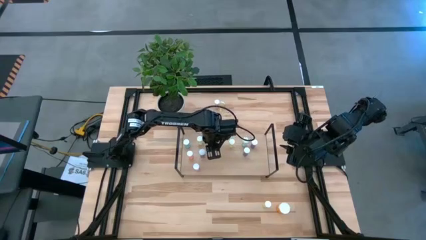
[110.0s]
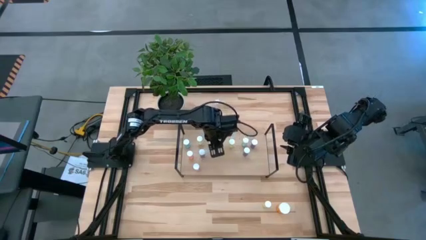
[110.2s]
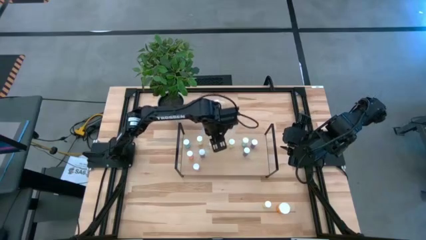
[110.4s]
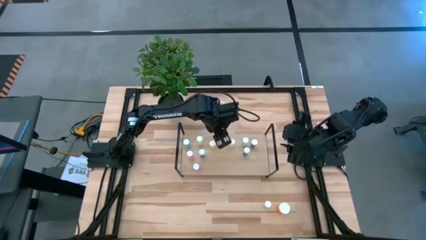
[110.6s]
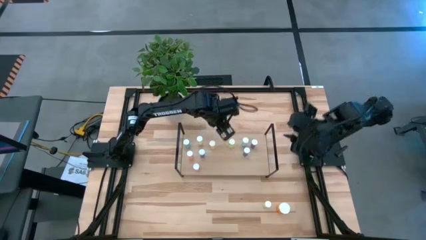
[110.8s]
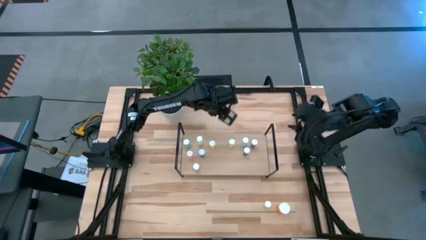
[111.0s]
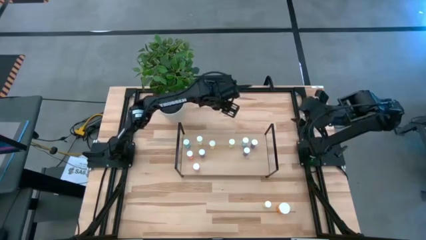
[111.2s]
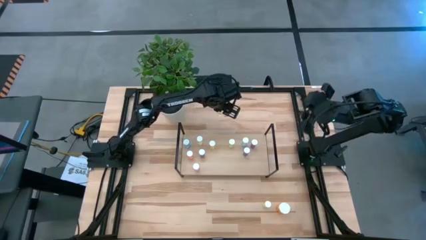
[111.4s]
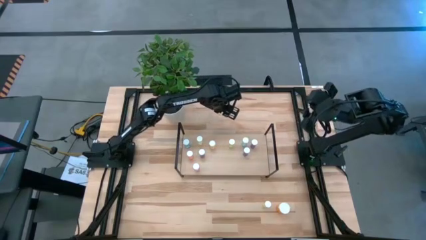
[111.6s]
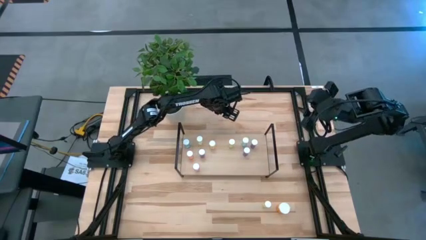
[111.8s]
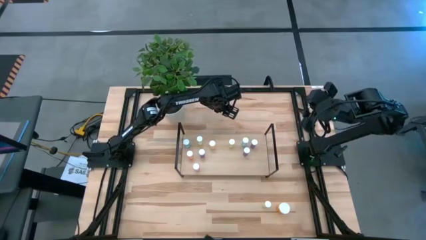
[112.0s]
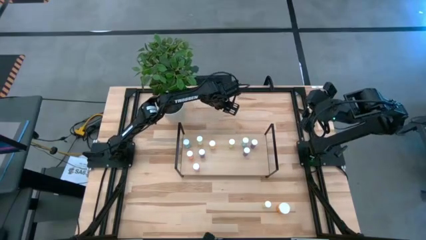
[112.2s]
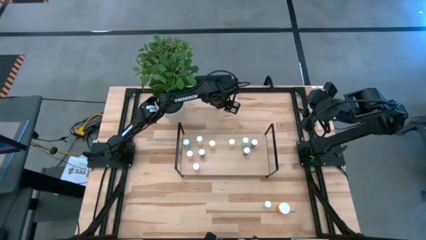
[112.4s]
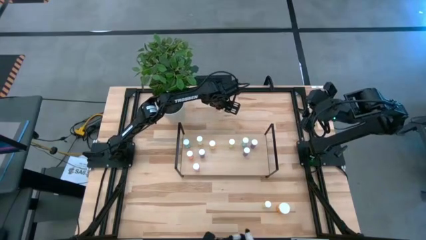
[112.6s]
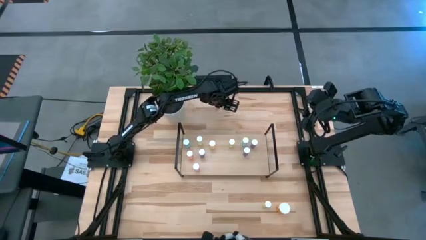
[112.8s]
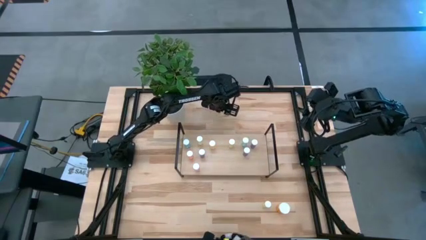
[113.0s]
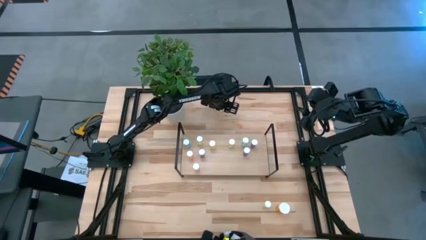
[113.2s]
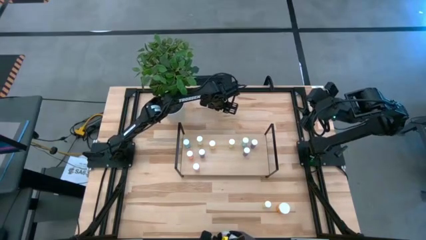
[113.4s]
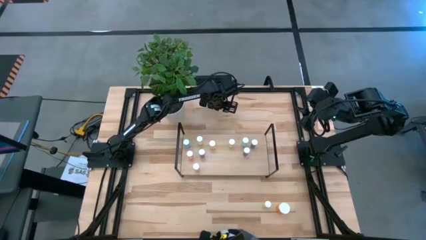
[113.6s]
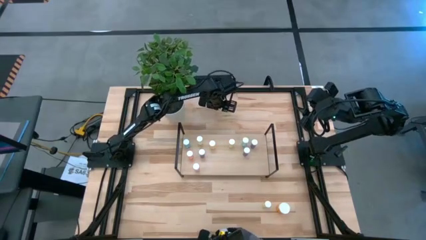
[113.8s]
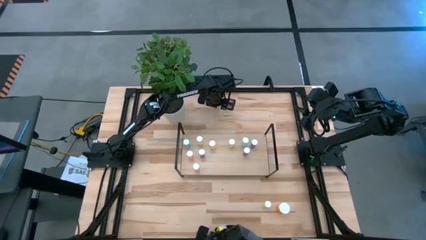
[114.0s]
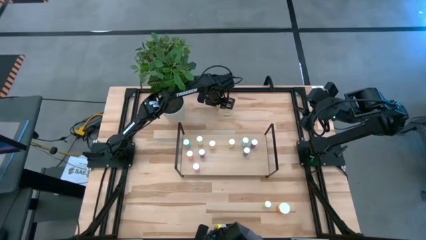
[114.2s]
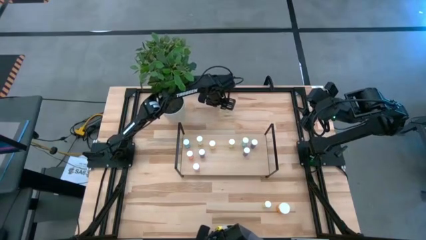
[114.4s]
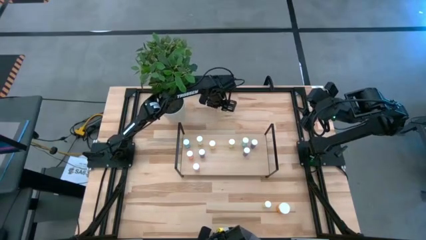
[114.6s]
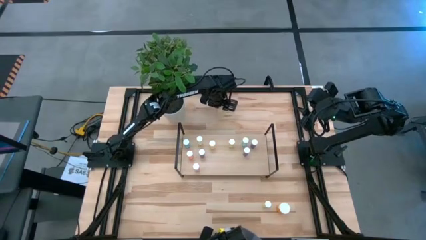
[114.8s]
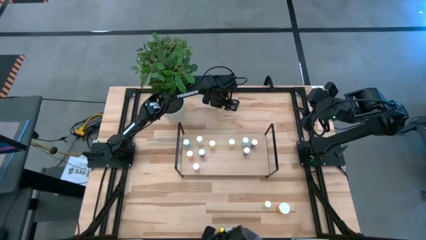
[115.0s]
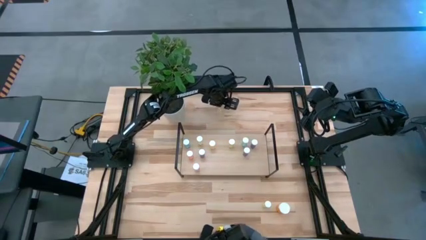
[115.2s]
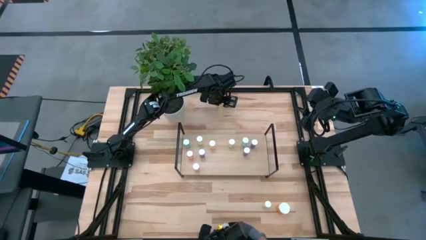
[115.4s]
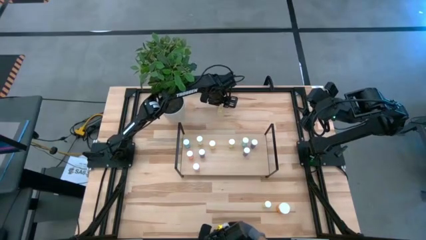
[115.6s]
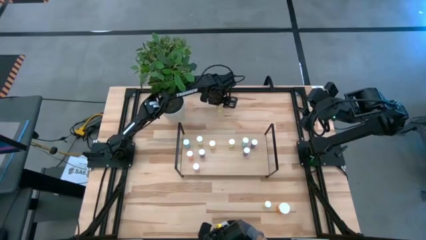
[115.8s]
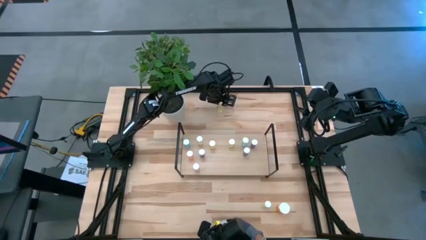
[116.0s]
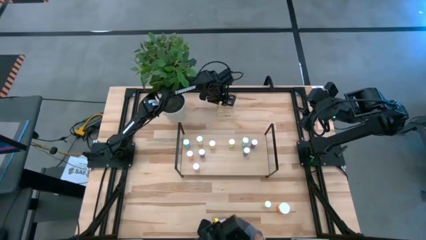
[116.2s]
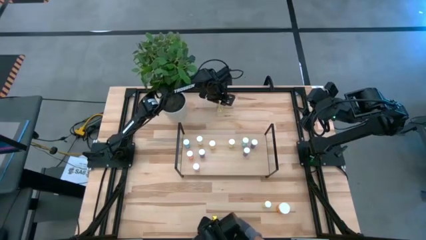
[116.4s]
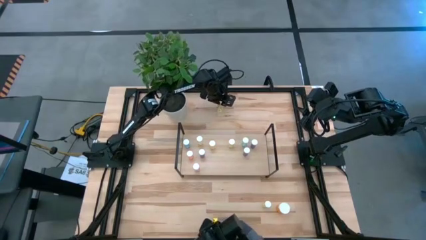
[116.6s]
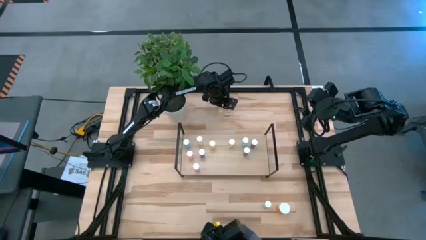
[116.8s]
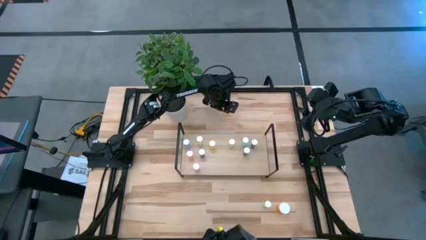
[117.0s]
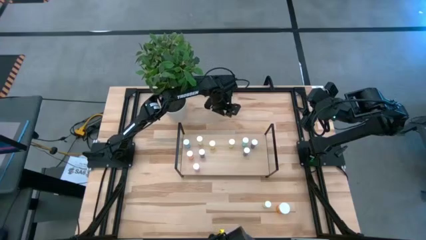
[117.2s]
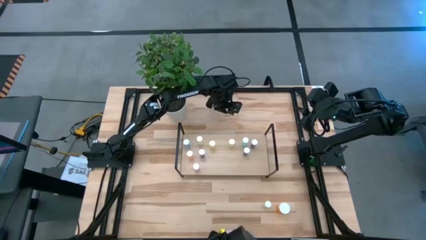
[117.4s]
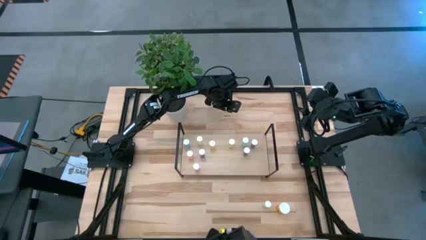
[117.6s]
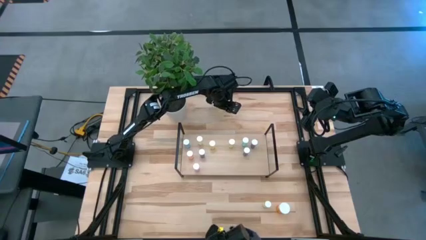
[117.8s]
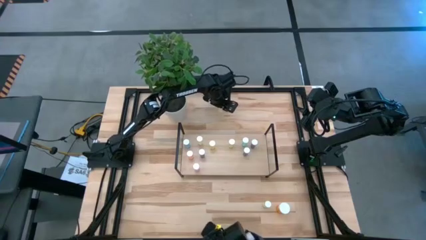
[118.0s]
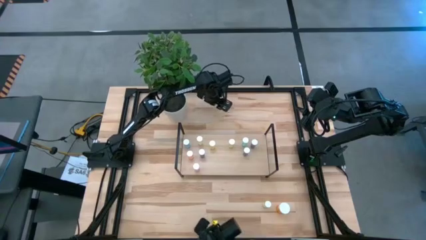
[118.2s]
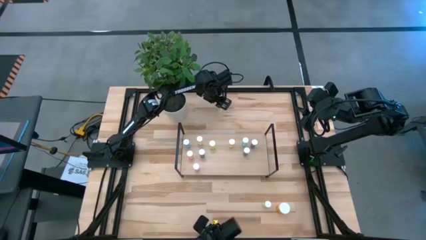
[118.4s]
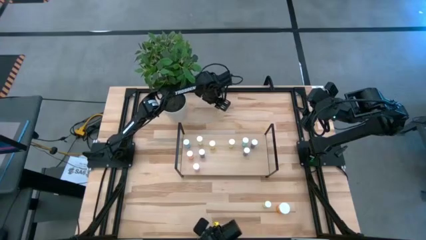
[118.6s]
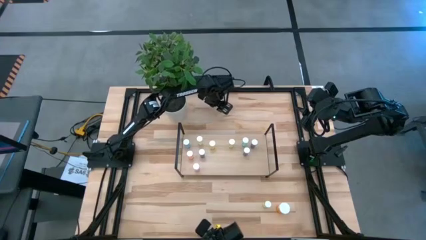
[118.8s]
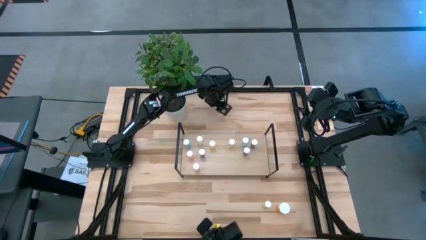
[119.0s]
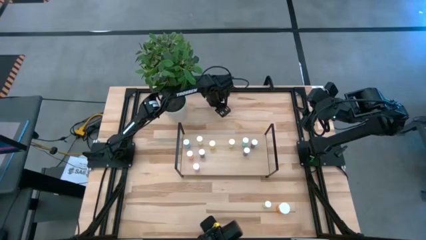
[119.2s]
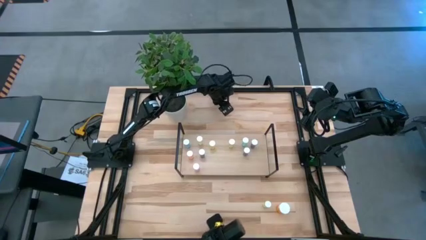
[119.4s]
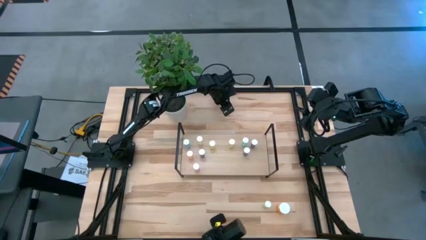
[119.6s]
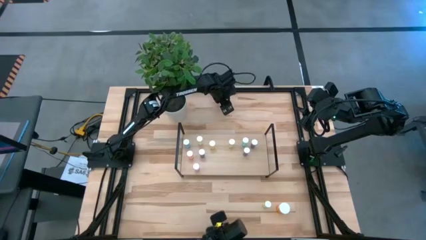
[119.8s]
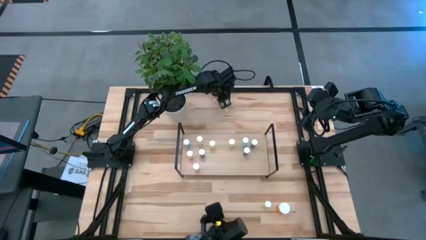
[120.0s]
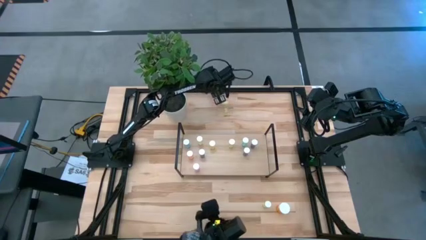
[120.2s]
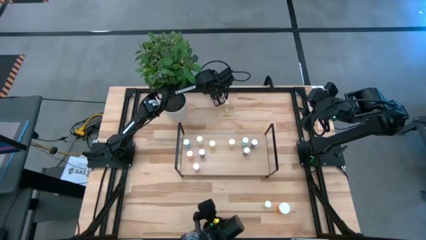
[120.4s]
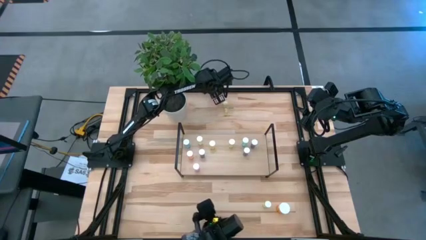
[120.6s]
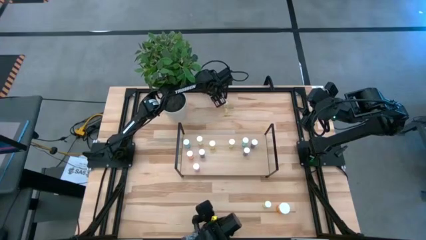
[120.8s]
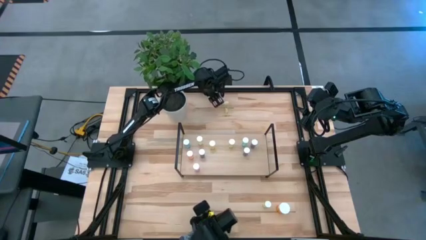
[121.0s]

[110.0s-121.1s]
Task: Pick and place medicine bottles onto shelf by color
Put the pink pill bottle on the shelf

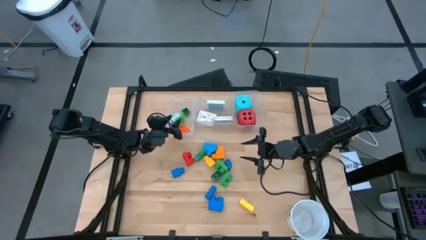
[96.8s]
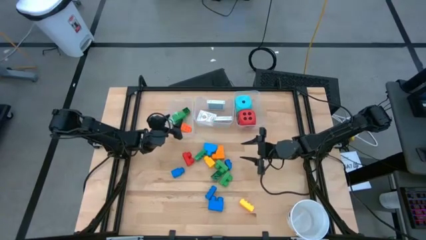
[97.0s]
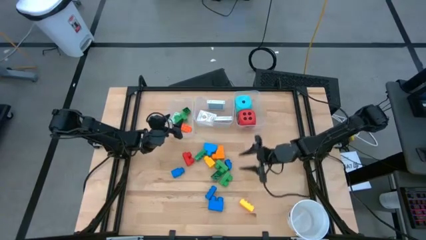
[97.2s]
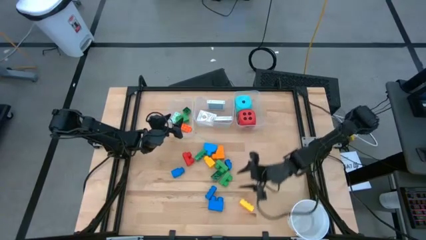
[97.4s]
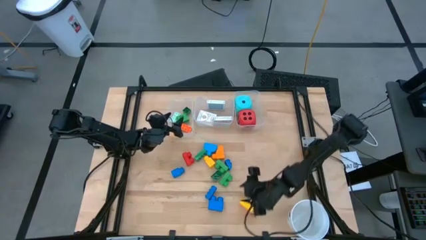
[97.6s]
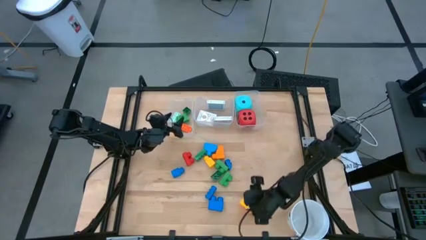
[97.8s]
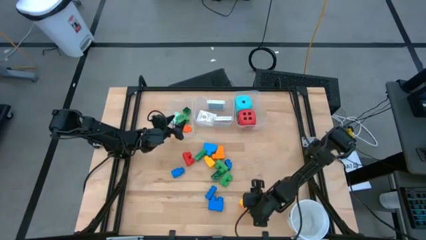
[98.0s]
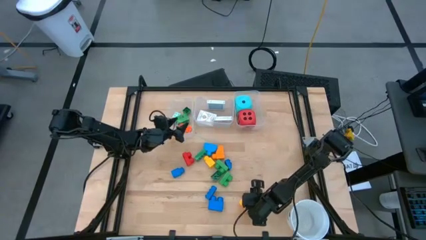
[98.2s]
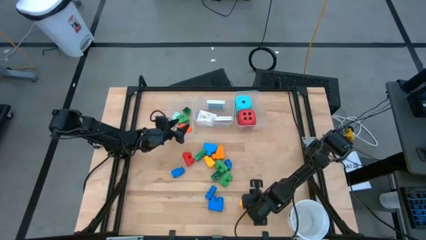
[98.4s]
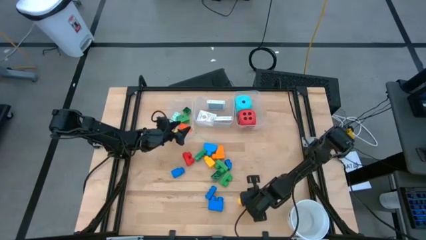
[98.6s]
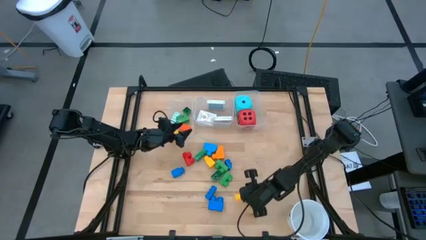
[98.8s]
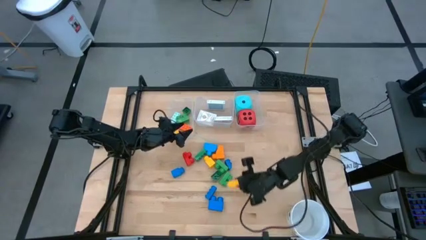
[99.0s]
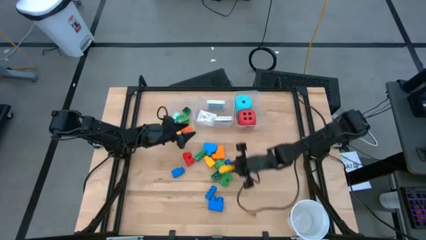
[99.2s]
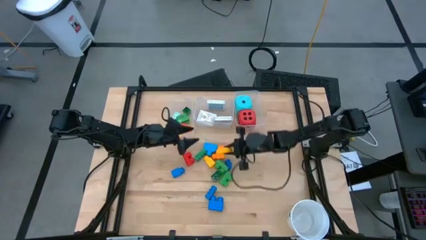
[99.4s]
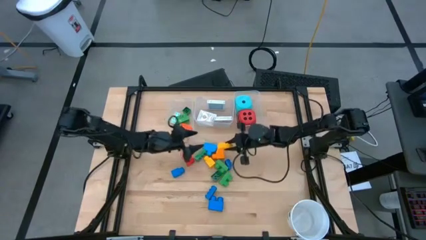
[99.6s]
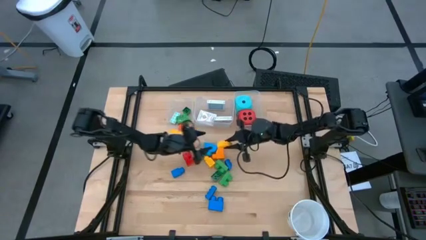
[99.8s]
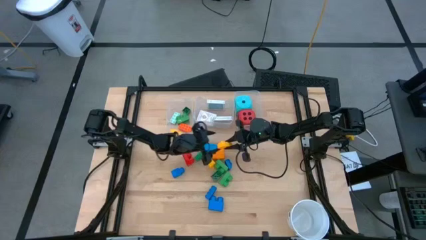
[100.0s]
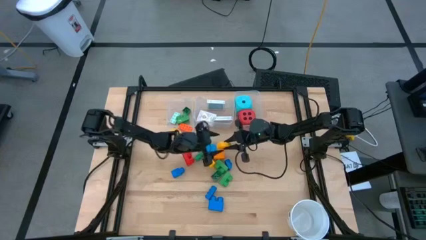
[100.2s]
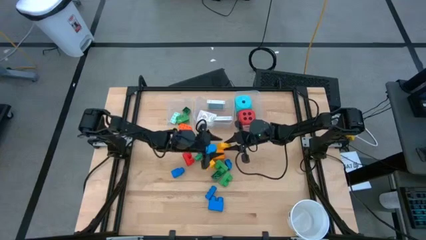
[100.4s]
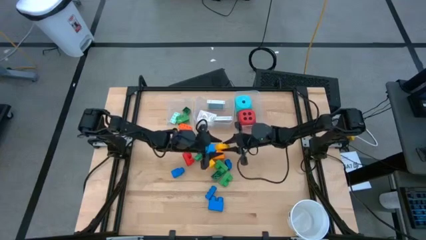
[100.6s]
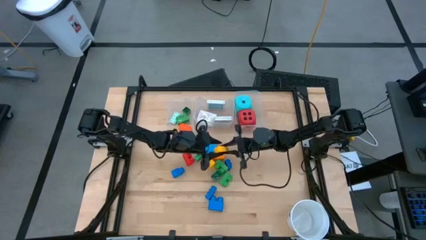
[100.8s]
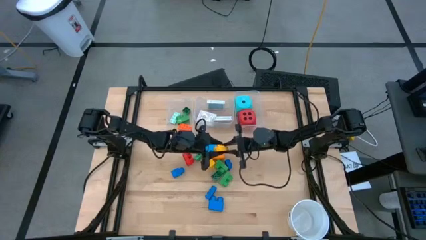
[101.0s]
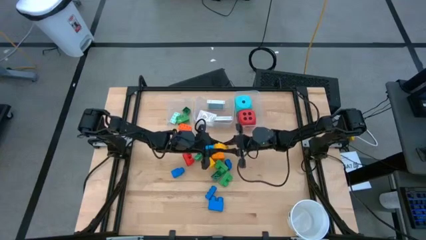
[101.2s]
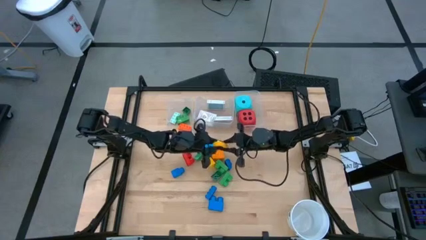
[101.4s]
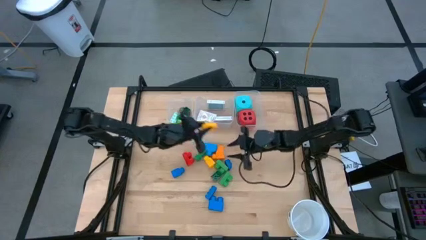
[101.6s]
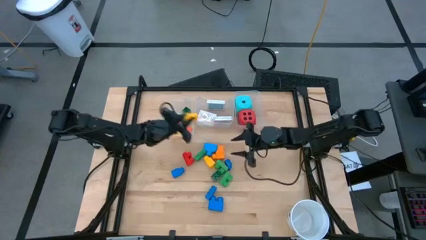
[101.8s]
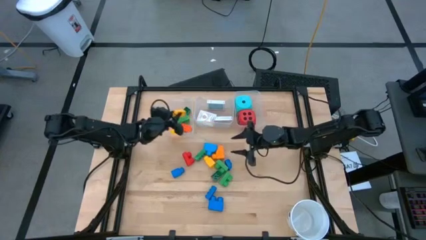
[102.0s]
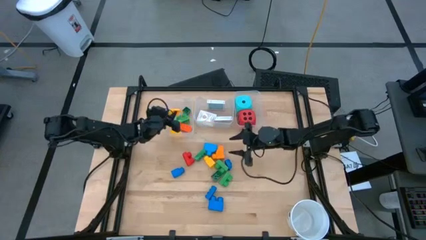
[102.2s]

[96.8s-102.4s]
Task: Pick & Place Toys
Put the yellow game piece into the left transparent bin
